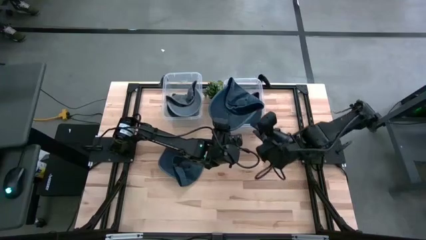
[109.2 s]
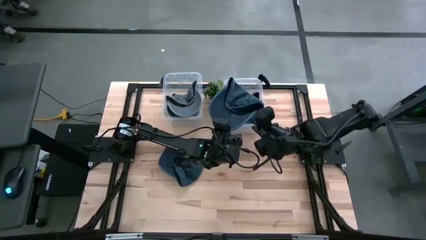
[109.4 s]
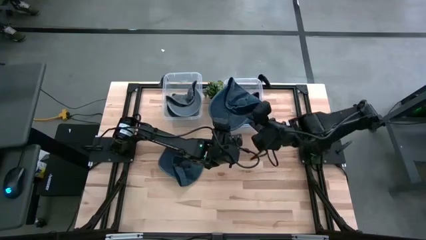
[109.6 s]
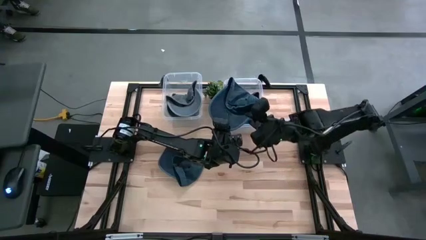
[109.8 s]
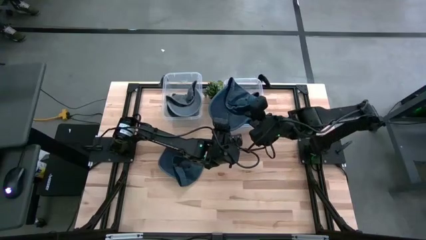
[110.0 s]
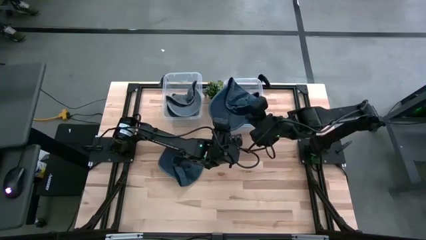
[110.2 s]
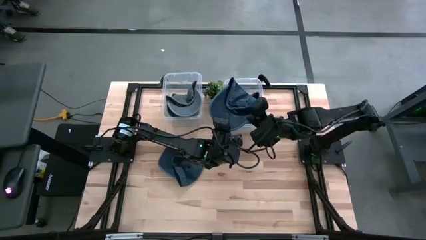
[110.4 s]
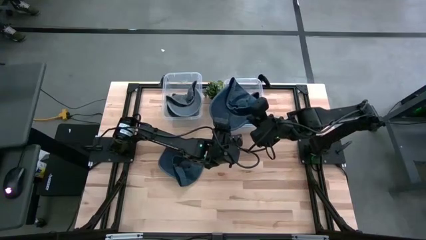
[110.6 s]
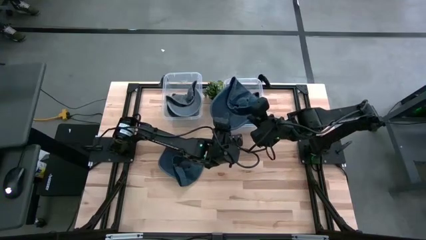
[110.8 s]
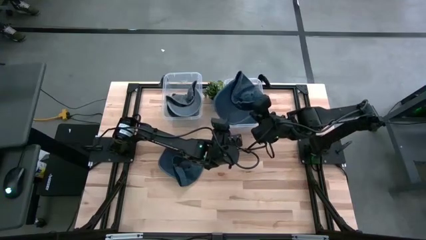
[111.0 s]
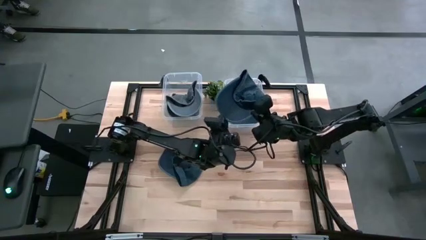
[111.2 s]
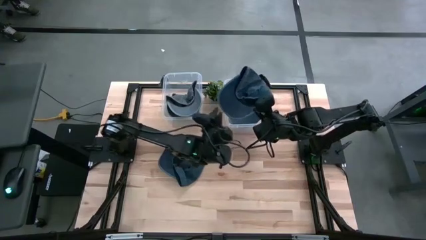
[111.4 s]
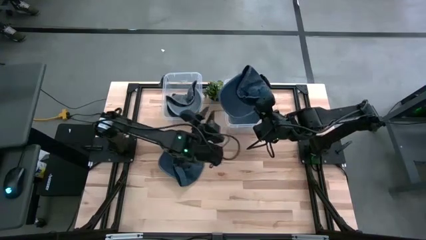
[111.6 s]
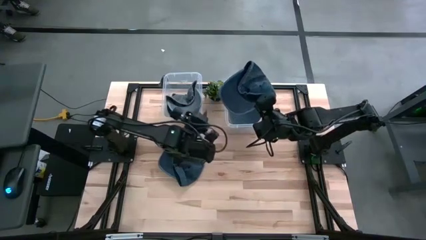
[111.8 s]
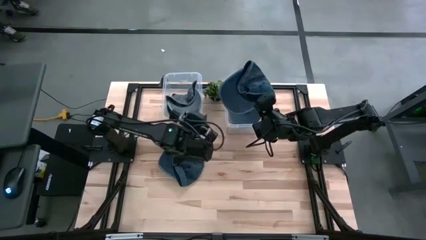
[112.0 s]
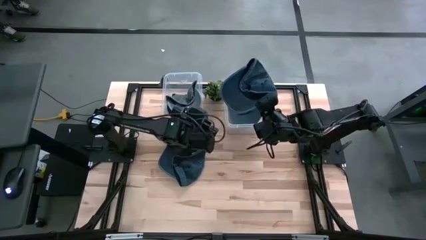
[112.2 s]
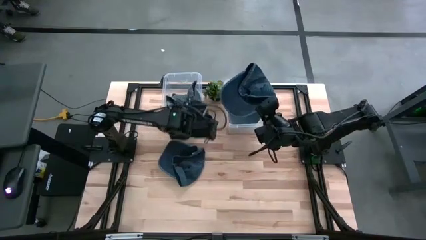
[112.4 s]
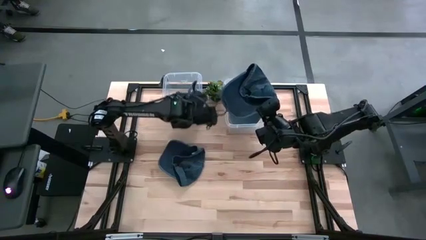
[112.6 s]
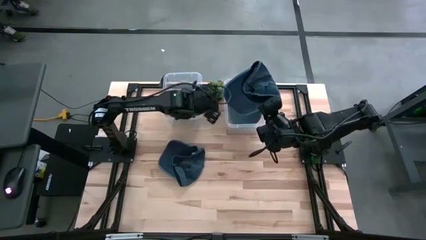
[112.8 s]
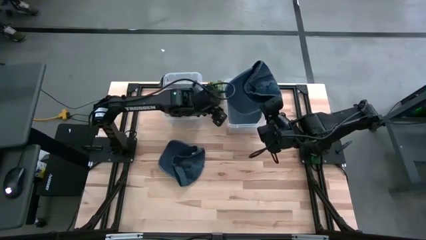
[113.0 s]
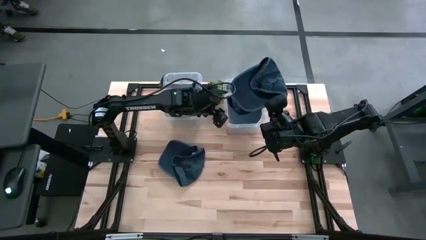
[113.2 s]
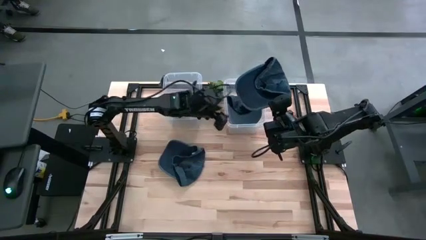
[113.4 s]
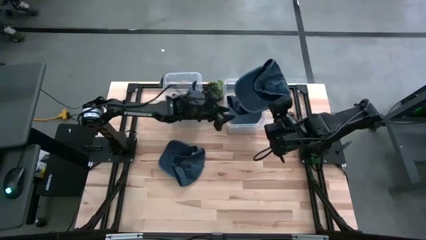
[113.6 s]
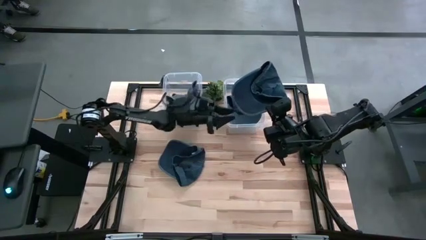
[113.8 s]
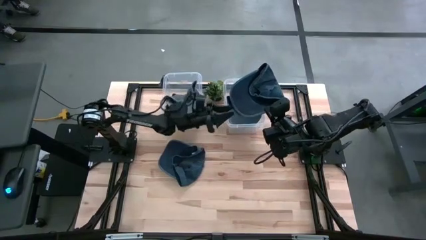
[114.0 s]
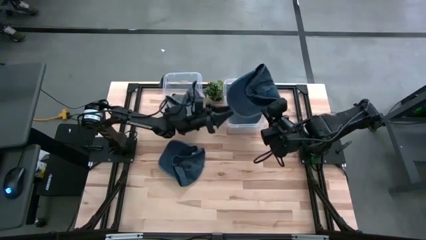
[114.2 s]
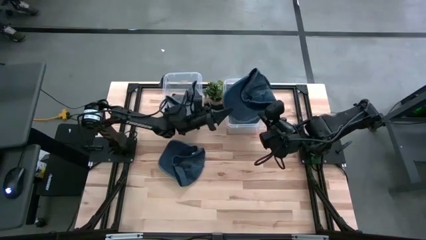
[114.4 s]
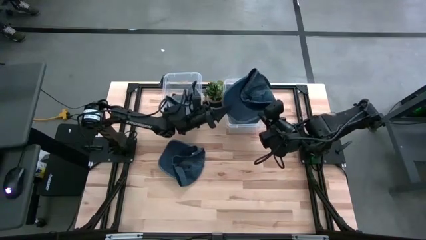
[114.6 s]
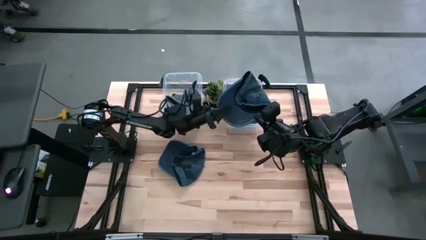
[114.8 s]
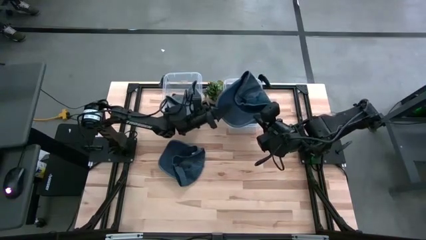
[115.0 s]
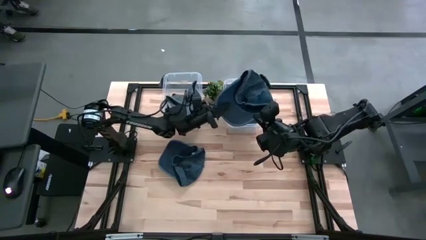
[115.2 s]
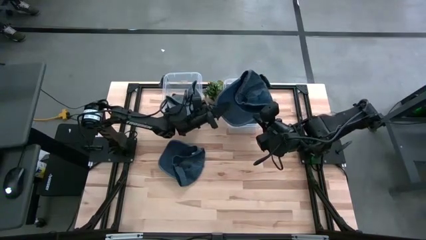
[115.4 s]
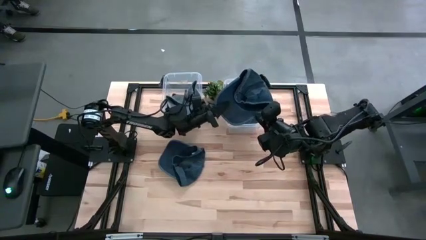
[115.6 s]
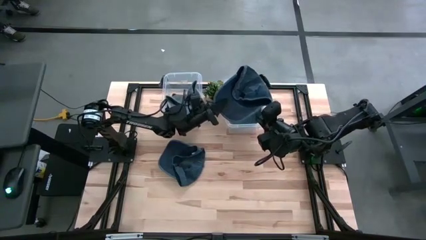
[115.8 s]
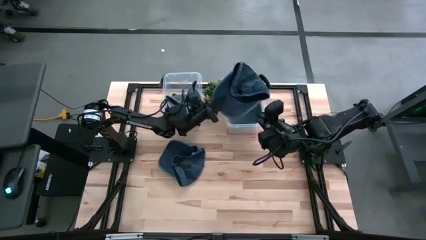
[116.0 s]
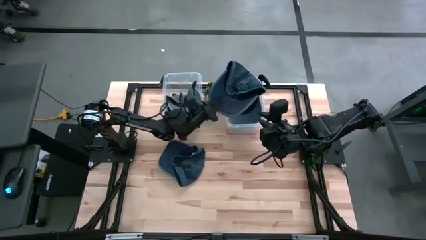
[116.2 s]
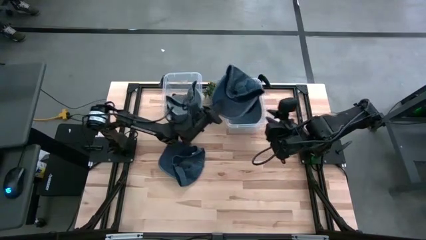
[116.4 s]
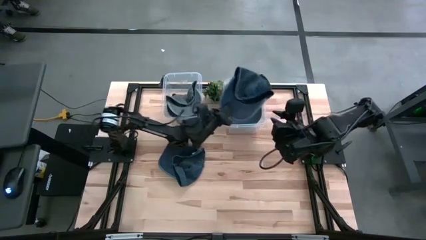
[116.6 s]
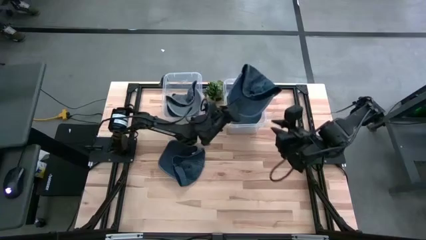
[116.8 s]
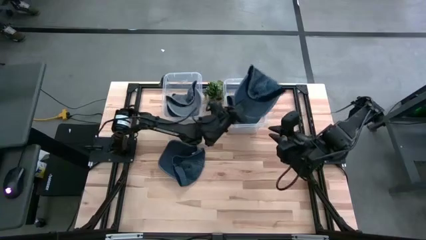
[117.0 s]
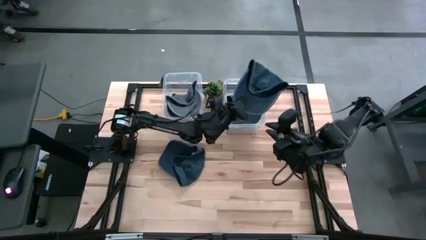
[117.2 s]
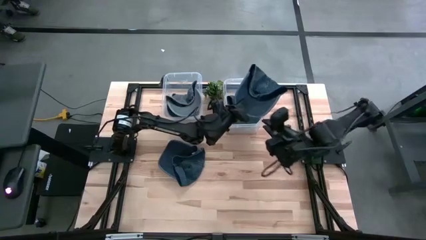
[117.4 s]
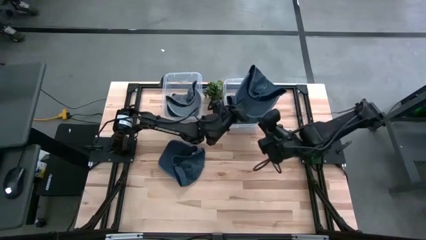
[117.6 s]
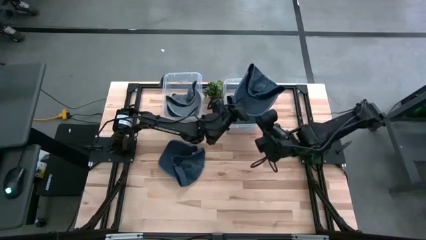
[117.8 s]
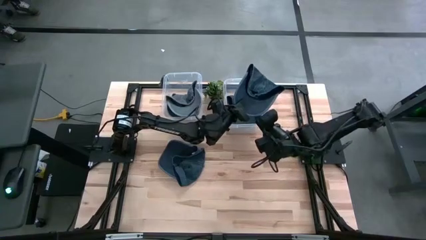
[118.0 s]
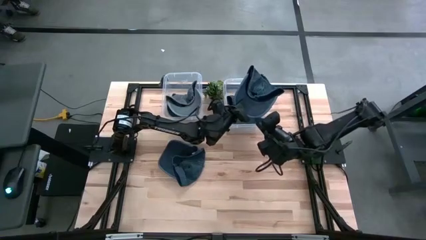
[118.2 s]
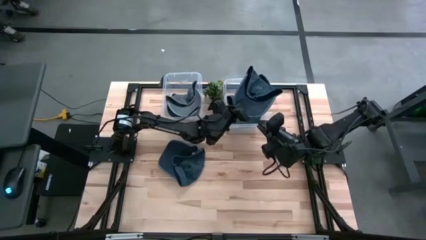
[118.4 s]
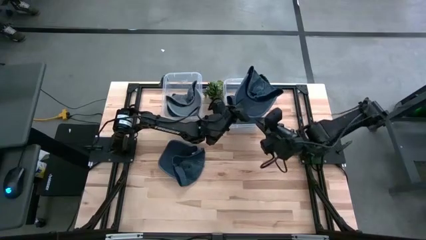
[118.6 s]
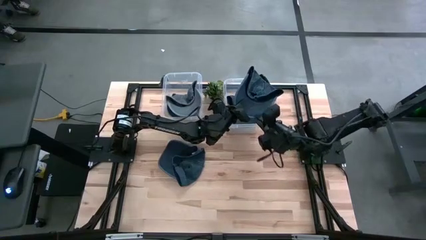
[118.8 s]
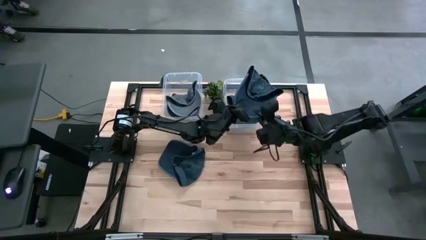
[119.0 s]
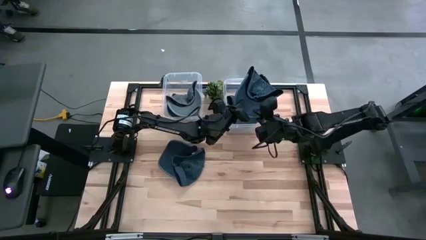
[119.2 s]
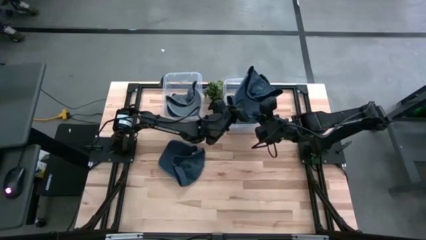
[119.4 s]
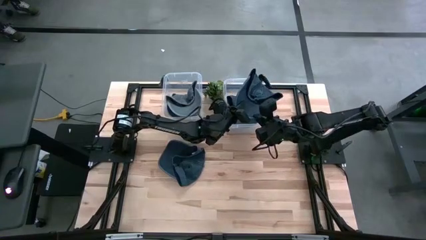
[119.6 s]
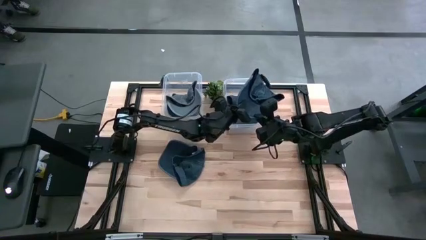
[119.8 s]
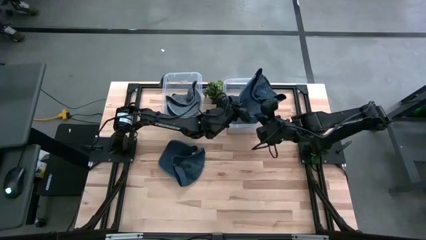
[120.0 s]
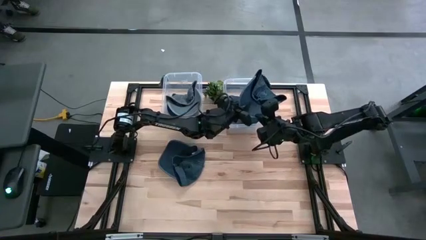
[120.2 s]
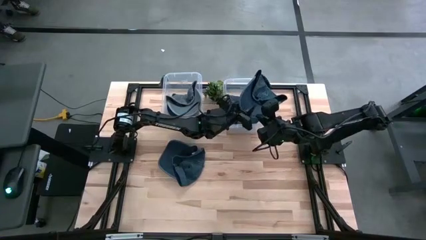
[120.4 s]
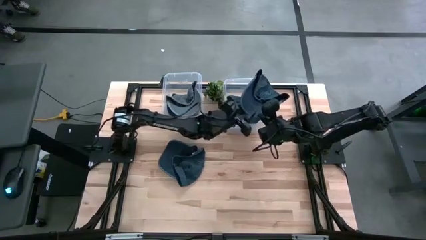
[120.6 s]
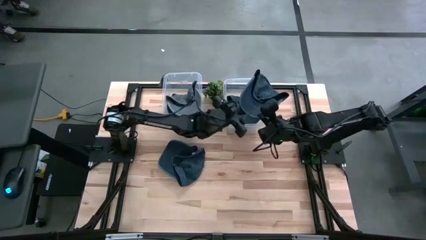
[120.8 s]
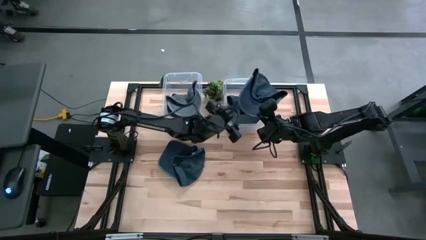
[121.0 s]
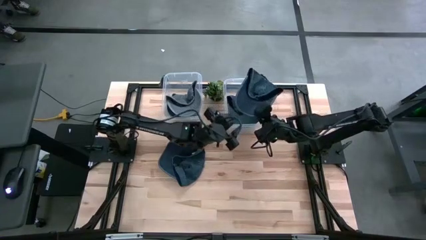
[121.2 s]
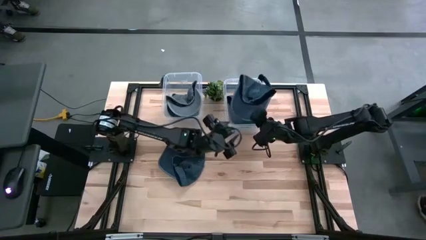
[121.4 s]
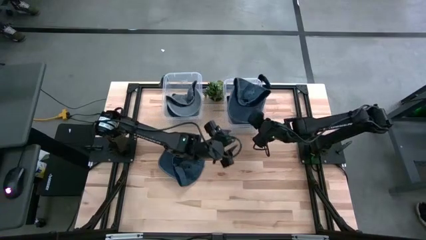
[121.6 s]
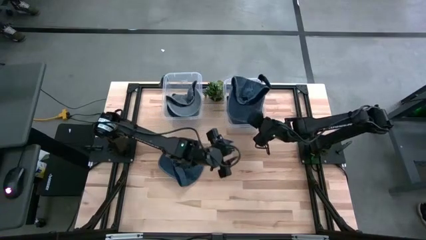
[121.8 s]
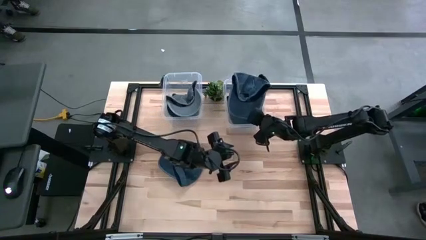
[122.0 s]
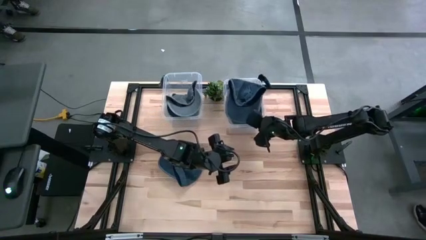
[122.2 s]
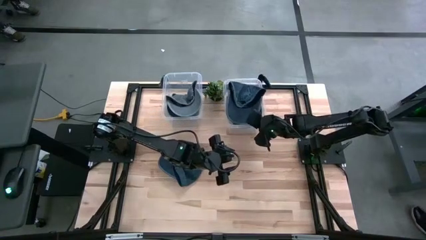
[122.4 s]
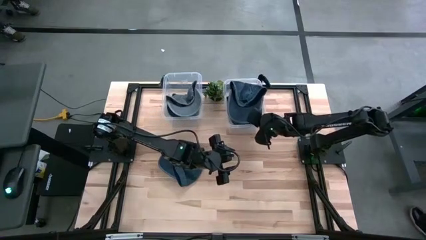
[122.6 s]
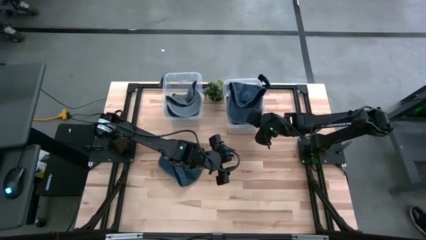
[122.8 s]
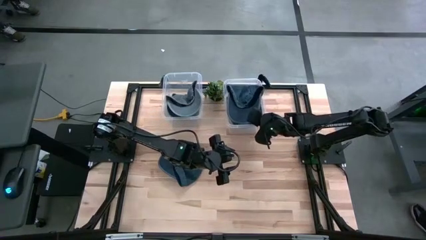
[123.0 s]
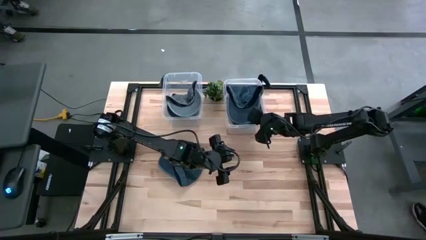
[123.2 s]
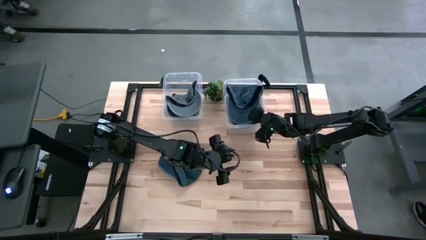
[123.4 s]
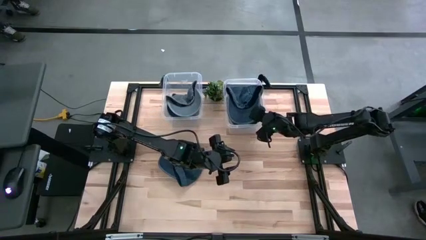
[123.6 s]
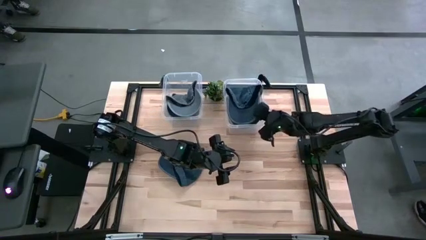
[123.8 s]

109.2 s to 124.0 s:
Task: Pick & Place hat
Put the top blue cap into the right transparent bin

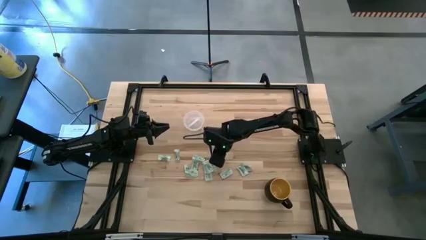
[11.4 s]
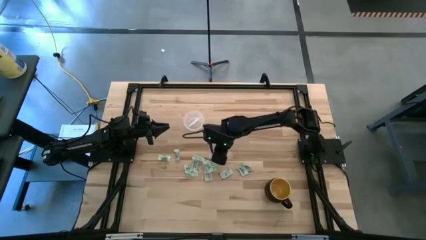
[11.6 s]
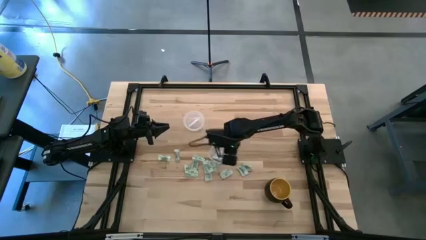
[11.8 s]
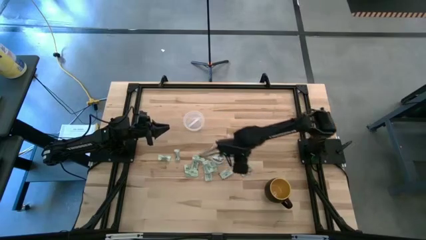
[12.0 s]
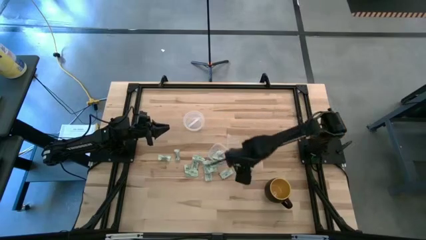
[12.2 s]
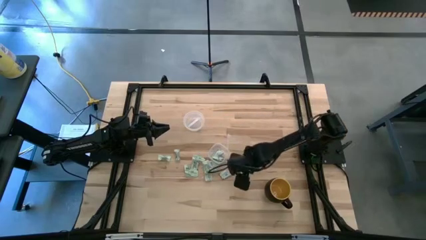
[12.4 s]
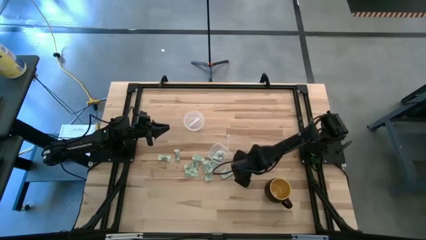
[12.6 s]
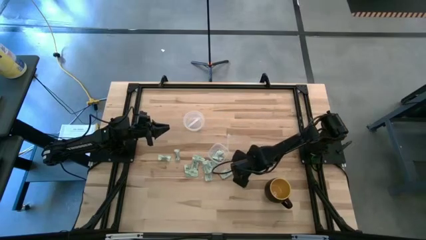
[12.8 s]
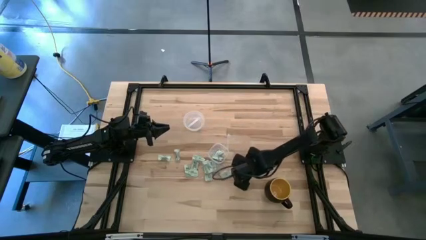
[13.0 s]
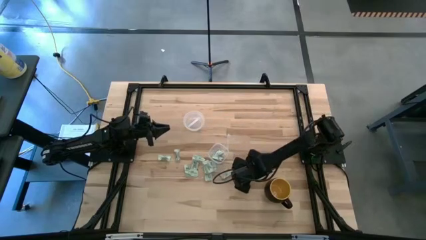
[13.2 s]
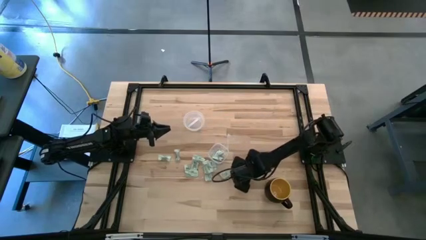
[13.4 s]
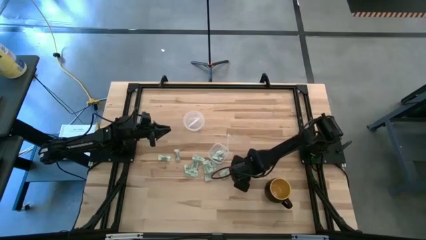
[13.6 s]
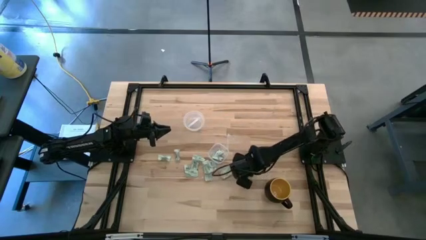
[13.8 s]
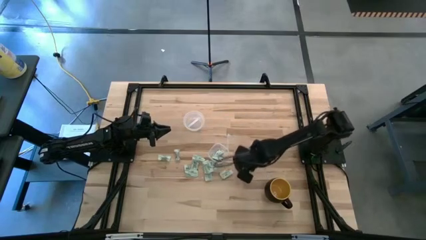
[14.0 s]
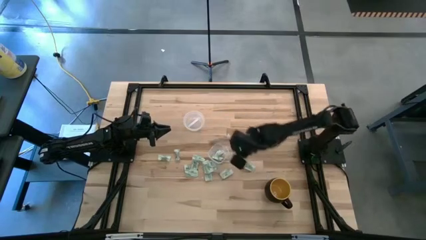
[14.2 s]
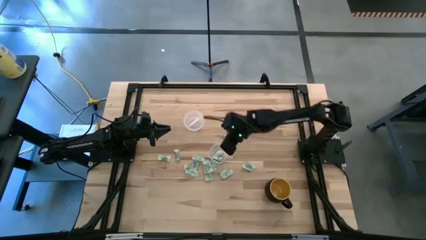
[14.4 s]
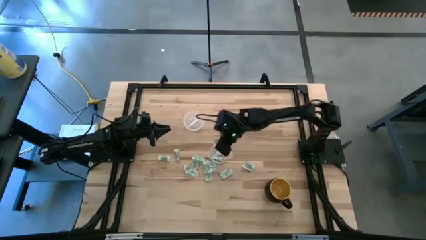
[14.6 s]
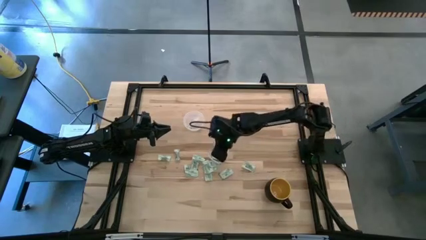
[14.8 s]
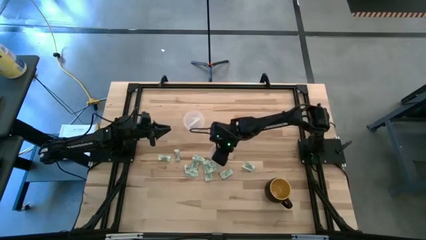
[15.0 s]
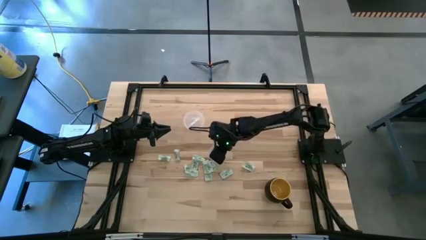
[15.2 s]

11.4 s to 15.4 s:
Task: Pick and place items into bin
Put the light green stevia packet into the transparent bin
